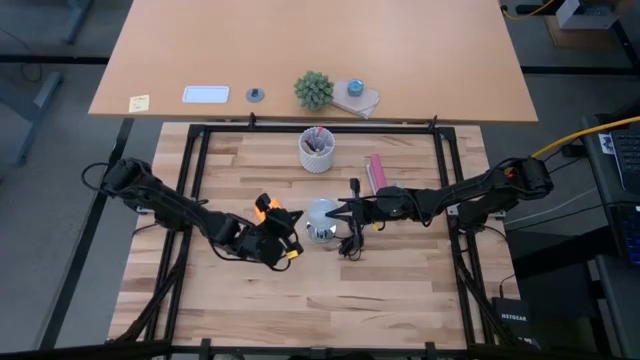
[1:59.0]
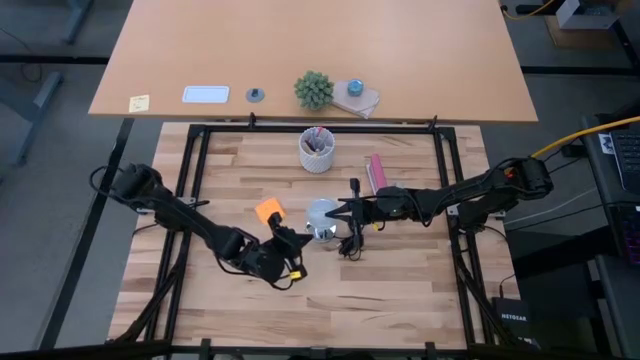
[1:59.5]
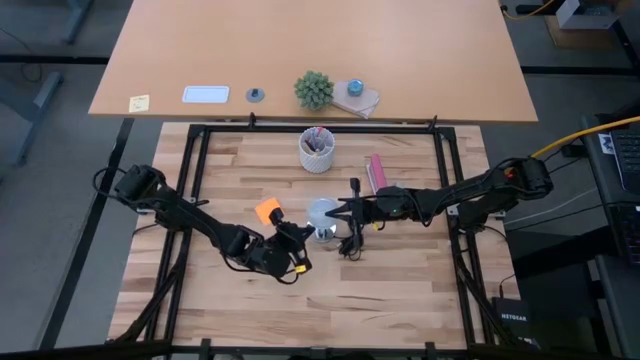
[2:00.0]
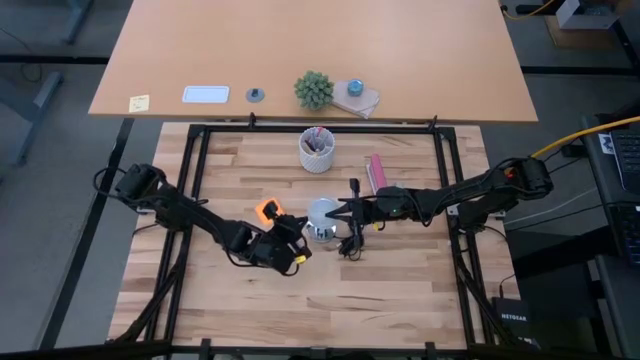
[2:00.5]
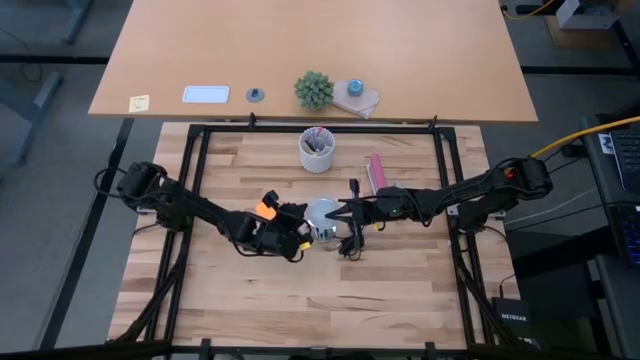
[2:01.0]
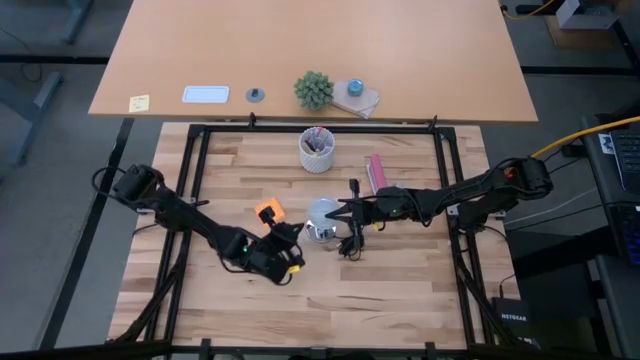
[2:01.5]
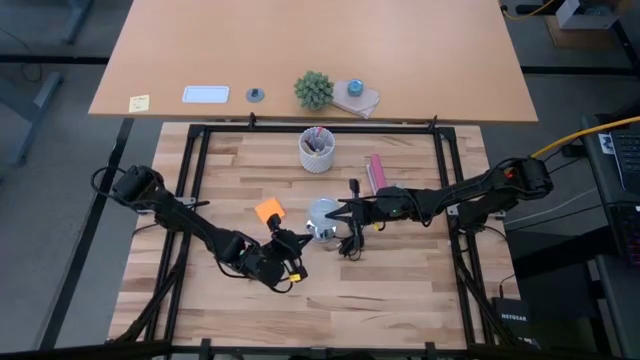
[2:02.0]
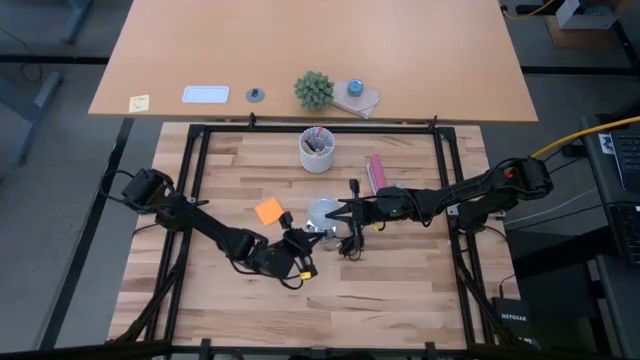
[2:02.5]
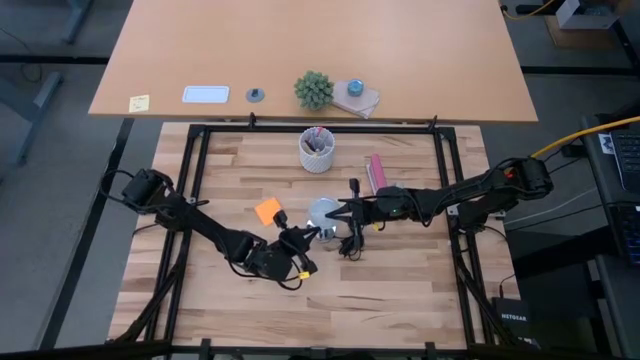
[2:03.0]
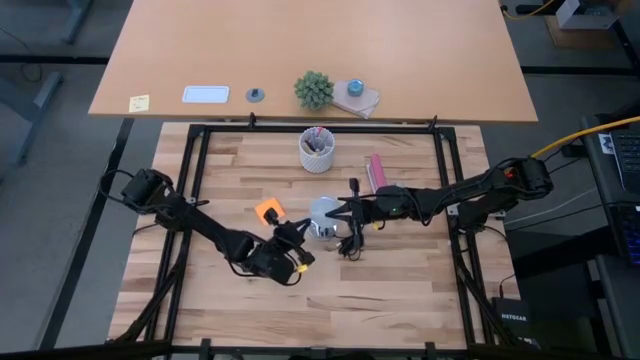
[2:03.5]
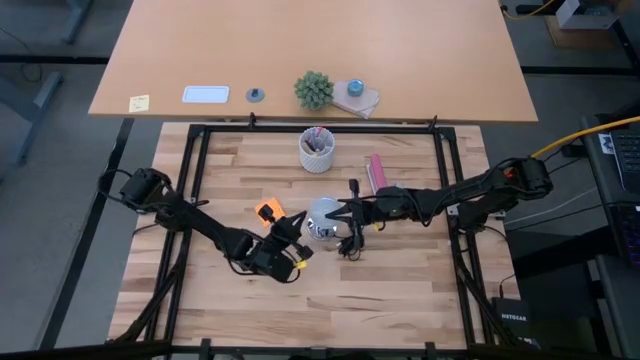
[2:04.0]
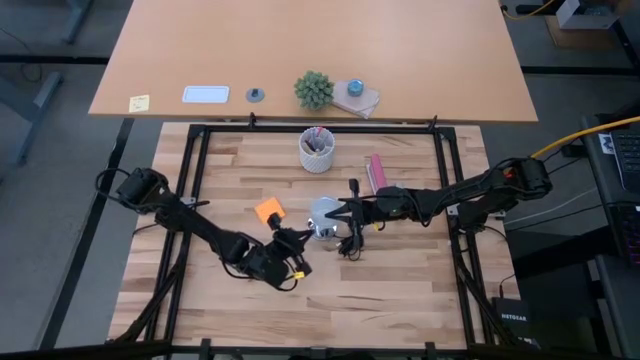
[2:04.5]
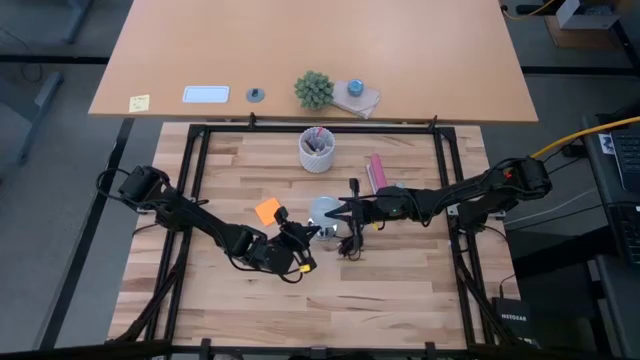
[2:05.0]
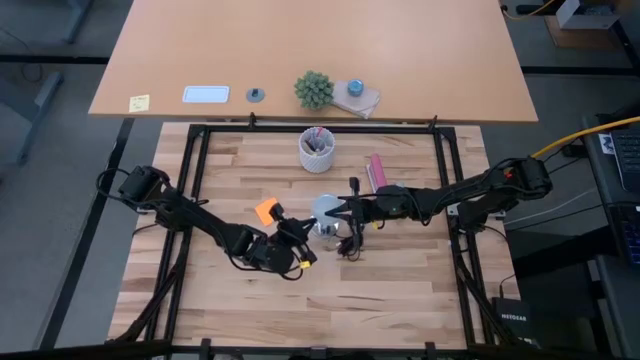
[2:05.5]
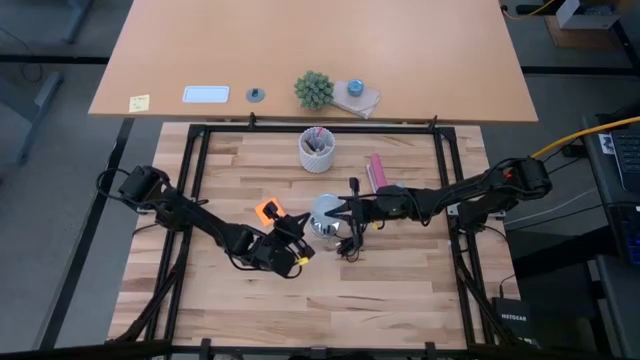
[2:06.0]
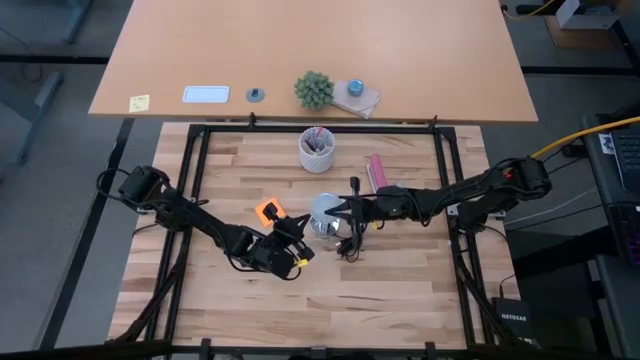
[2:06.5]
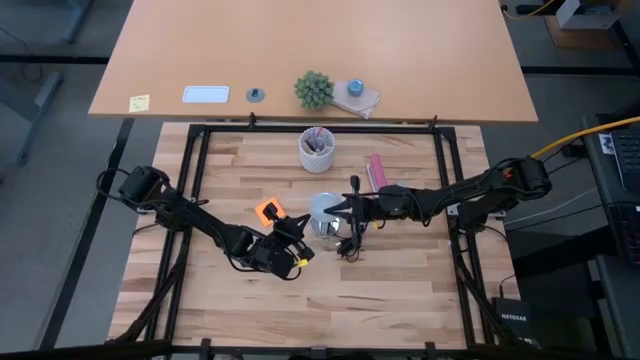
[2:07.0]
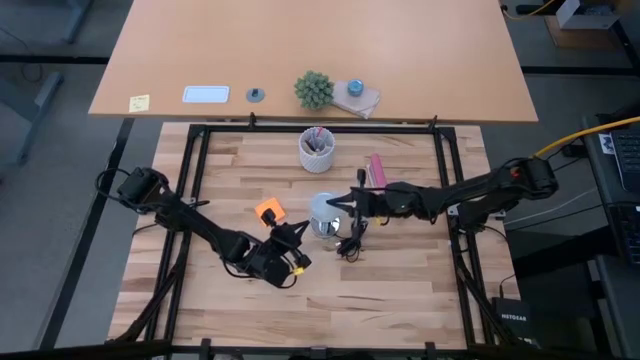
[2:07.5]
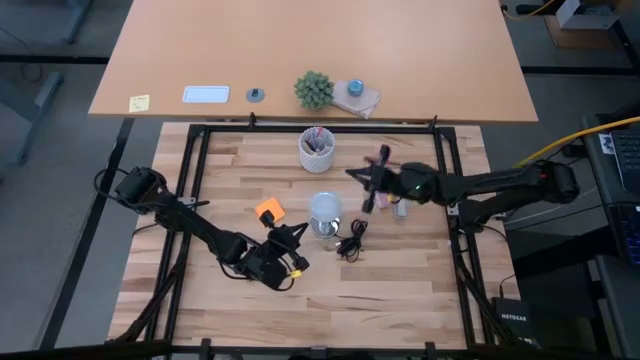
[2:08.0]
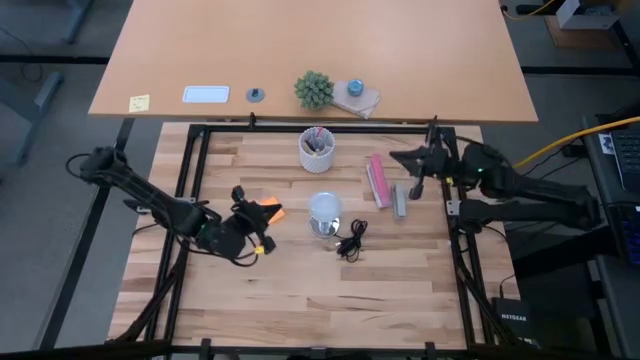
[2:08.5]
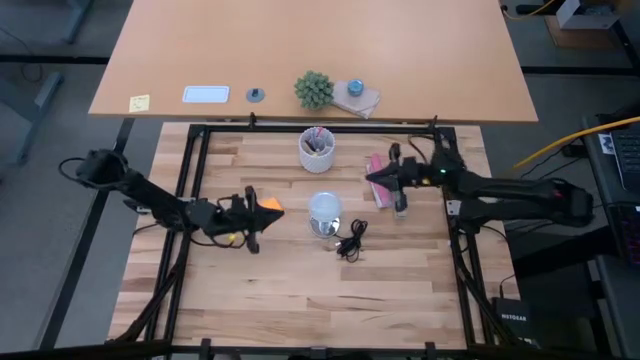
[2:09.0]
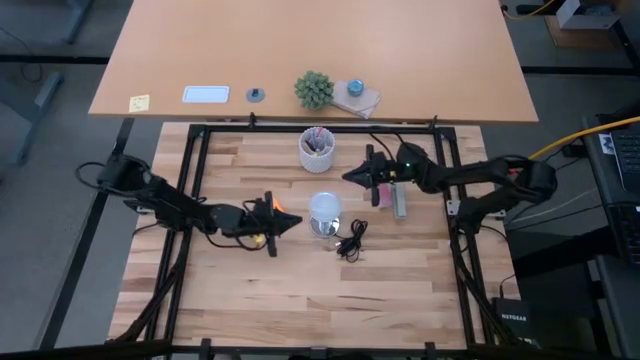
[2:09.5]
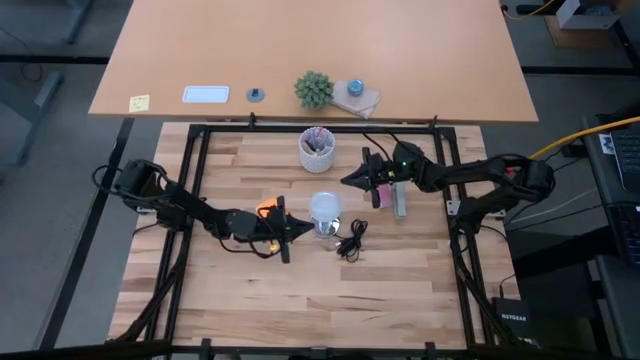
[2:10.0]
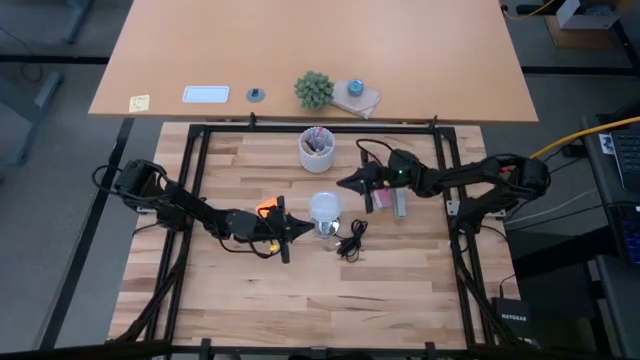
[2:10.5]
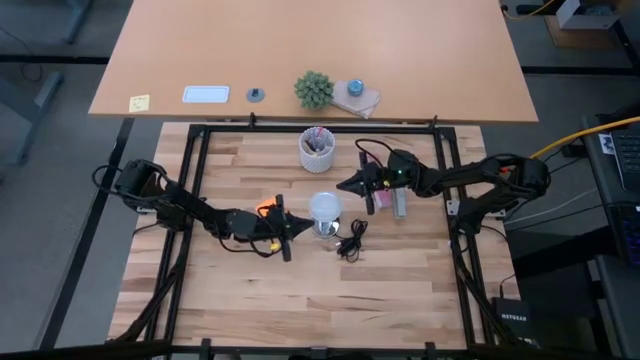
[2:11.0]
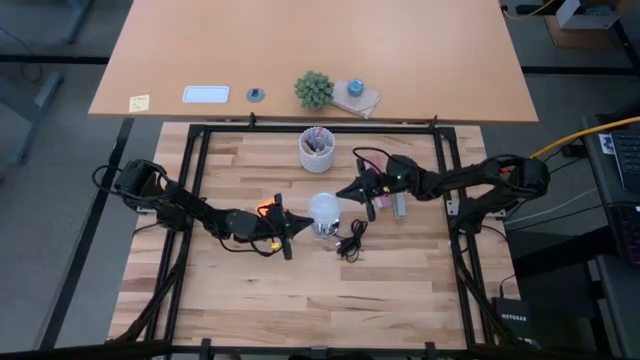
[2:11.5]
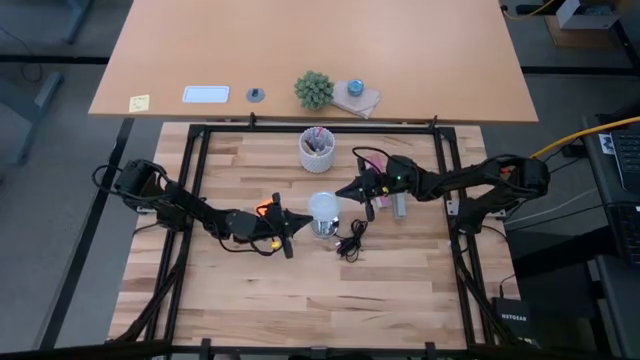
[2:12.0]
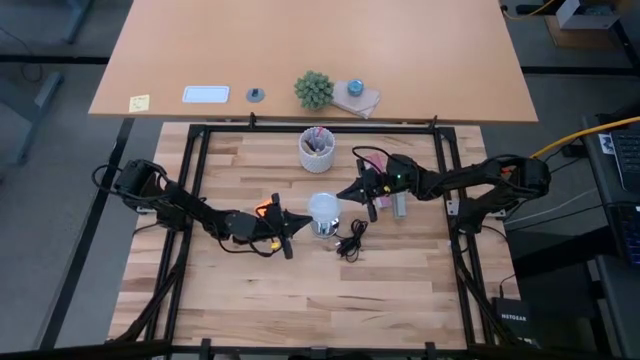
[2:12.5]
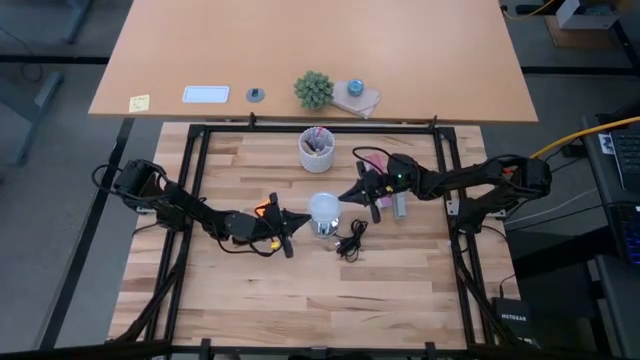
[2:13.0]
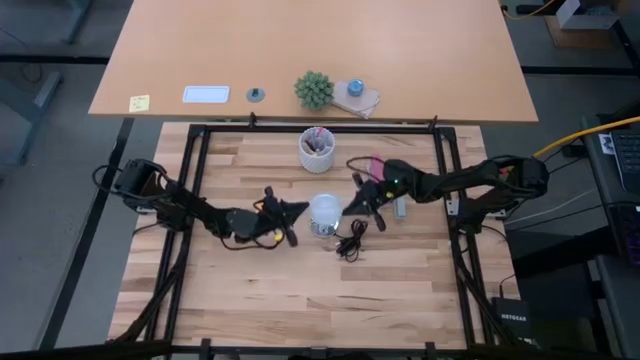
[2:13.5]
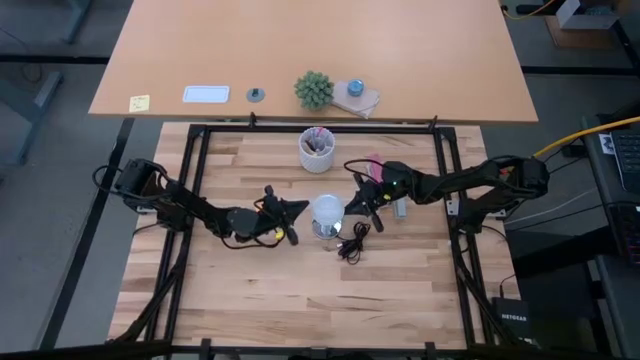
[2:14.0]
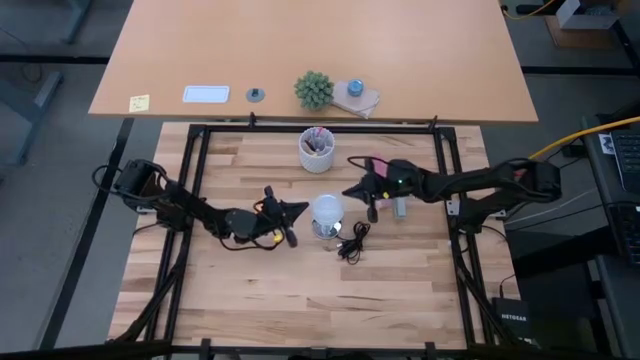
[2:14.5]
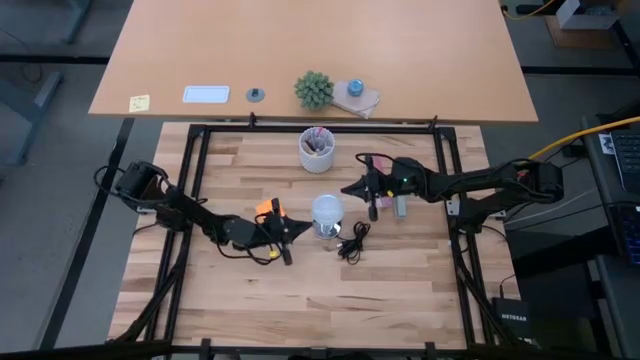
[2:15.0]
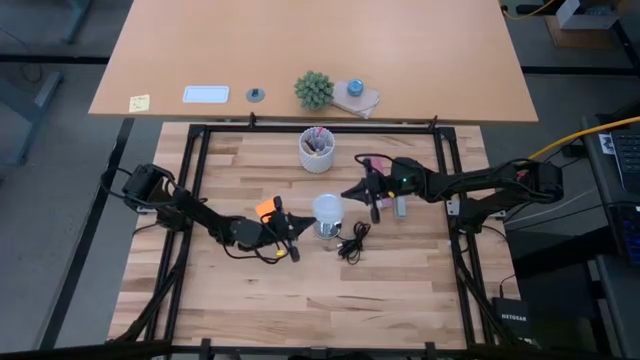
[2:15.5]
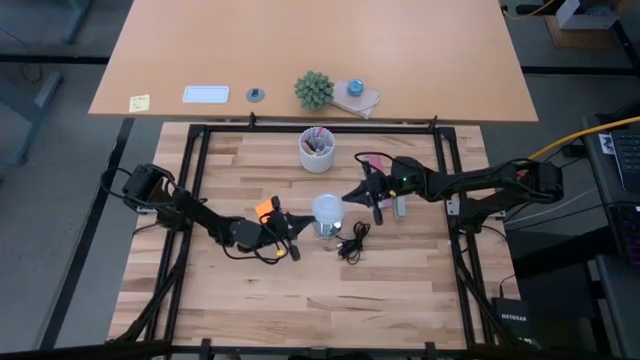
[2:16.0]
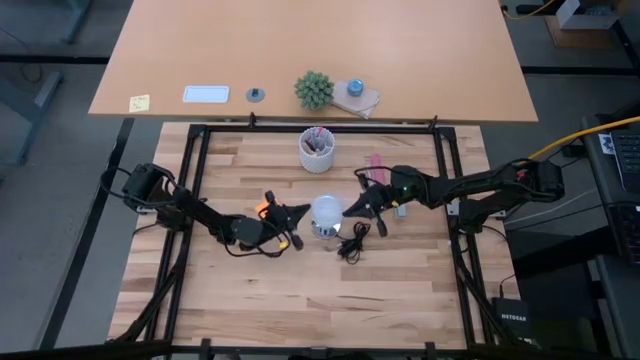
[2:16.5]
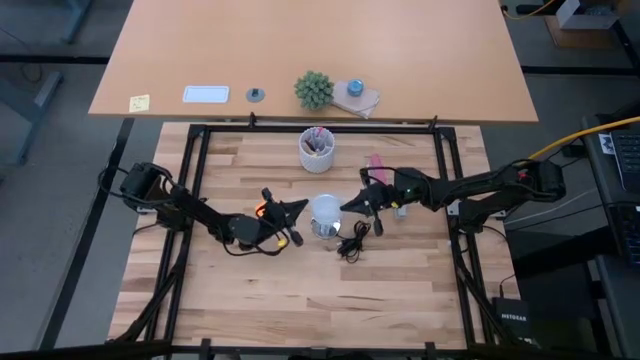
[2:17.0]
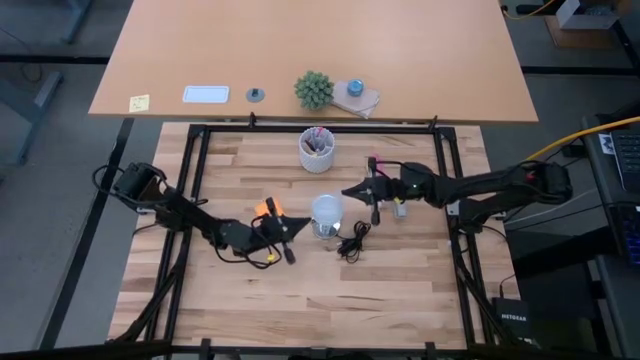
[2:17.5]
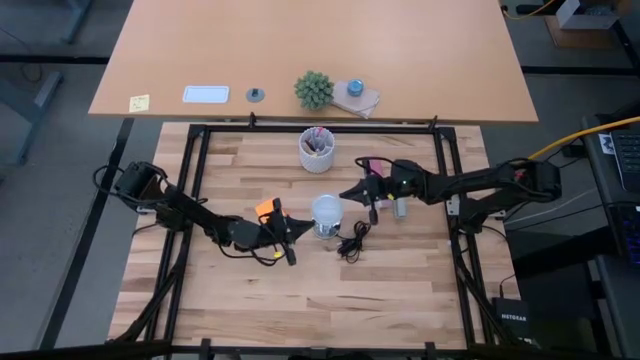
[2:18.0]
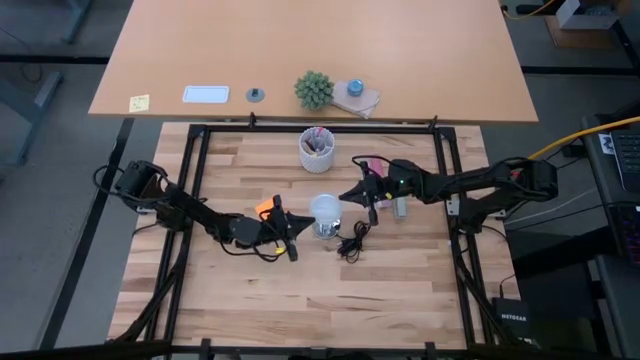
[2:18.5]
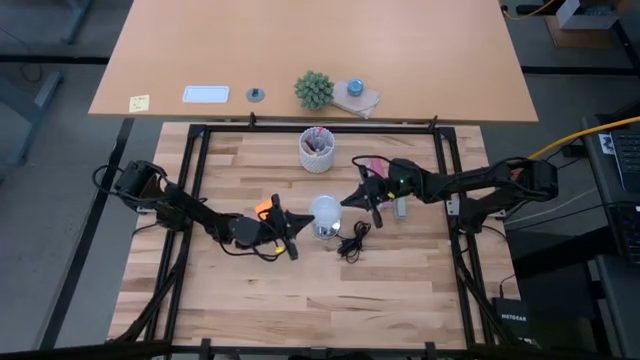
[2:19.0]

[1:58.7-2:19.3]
Task: Screw lightbulb
Insert the lightbulb into the lamp
